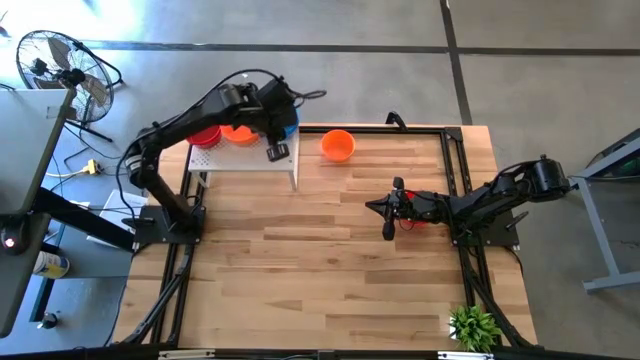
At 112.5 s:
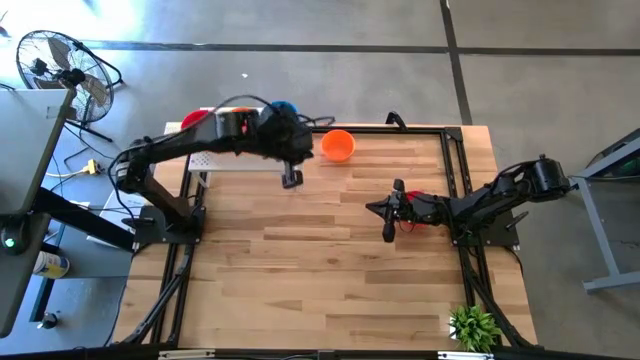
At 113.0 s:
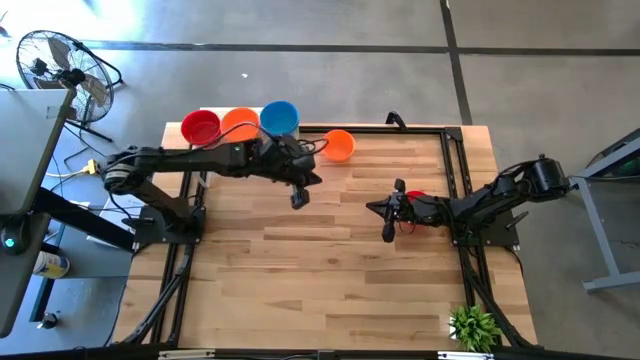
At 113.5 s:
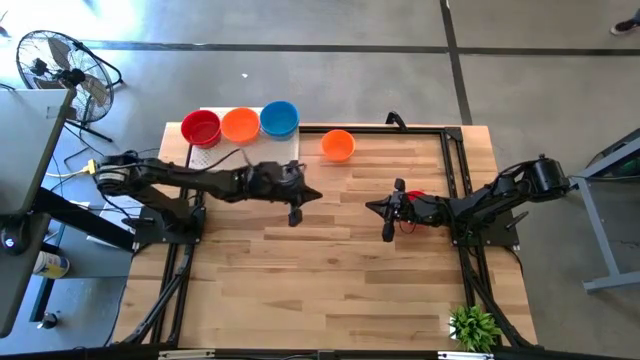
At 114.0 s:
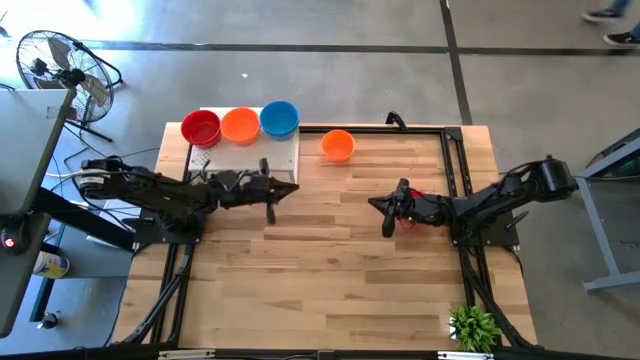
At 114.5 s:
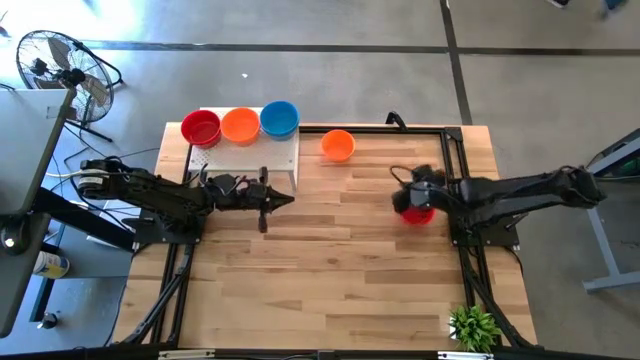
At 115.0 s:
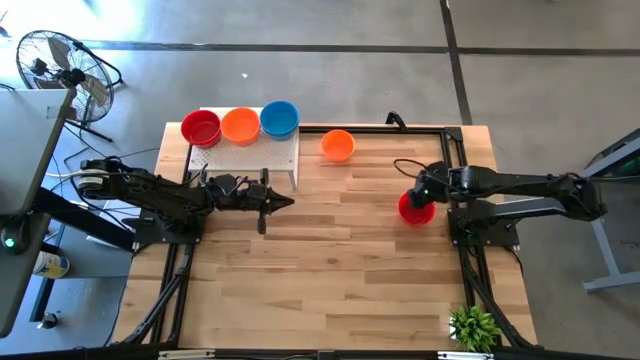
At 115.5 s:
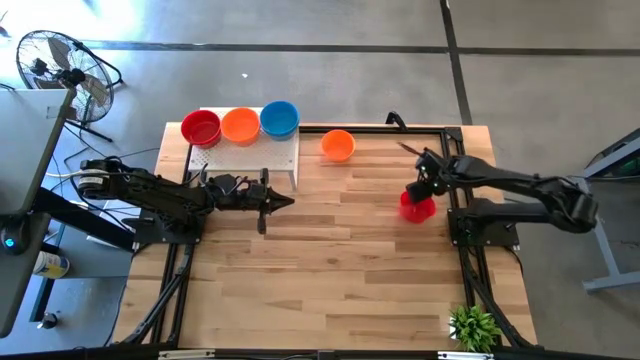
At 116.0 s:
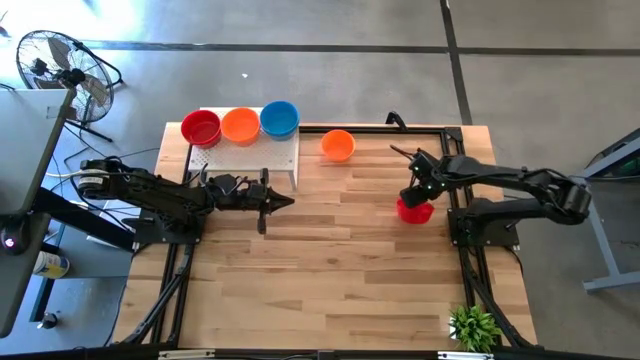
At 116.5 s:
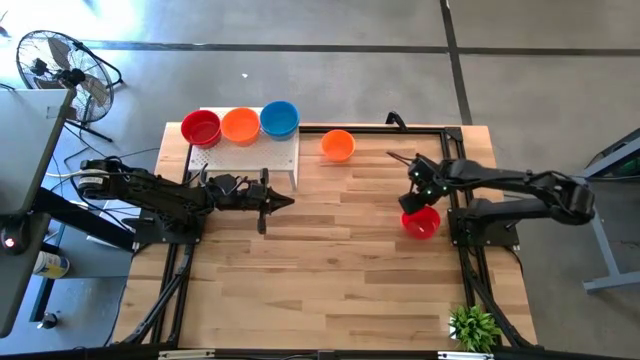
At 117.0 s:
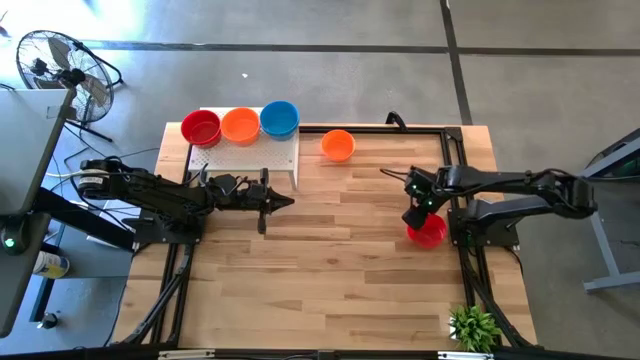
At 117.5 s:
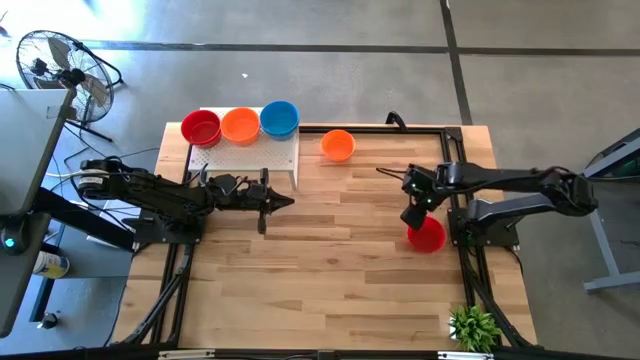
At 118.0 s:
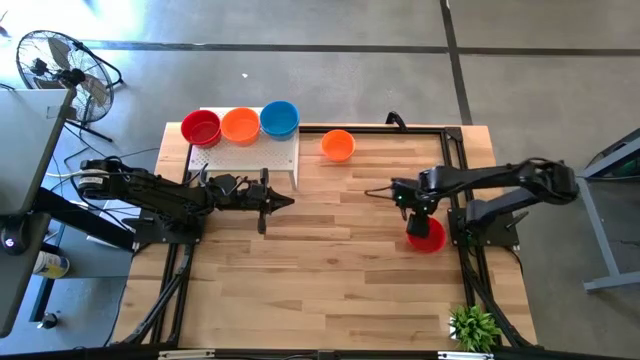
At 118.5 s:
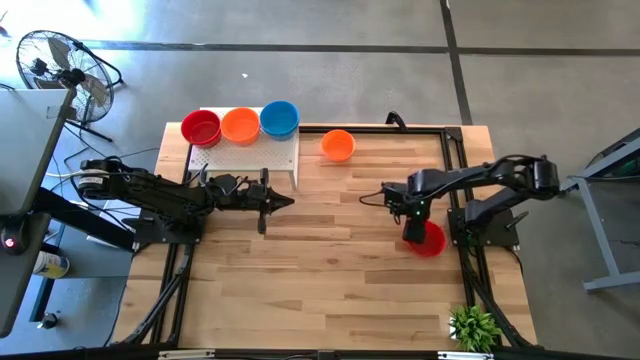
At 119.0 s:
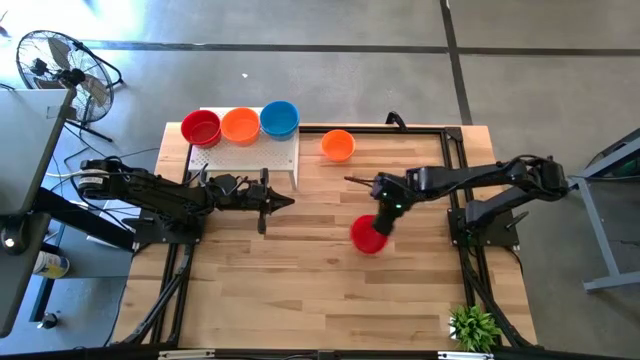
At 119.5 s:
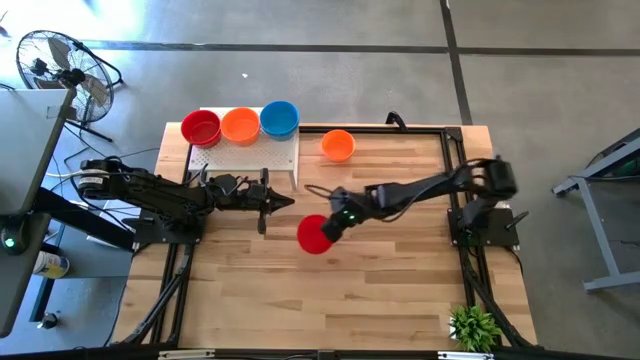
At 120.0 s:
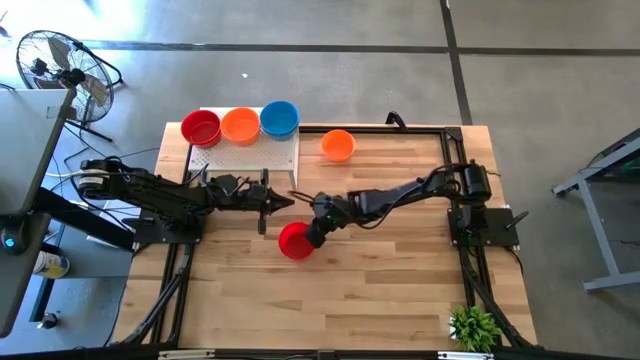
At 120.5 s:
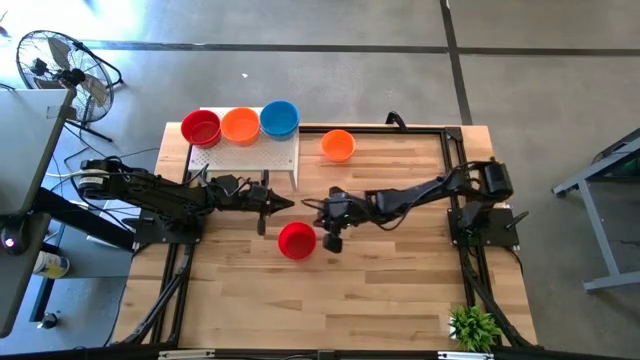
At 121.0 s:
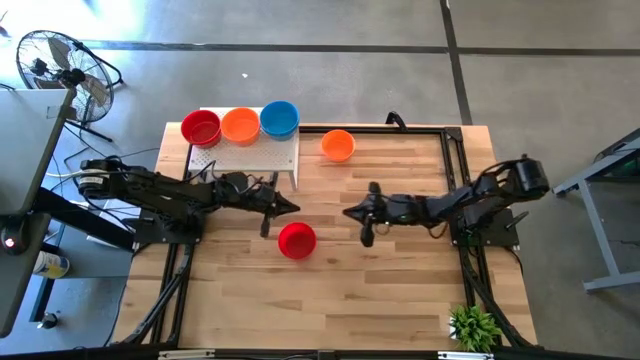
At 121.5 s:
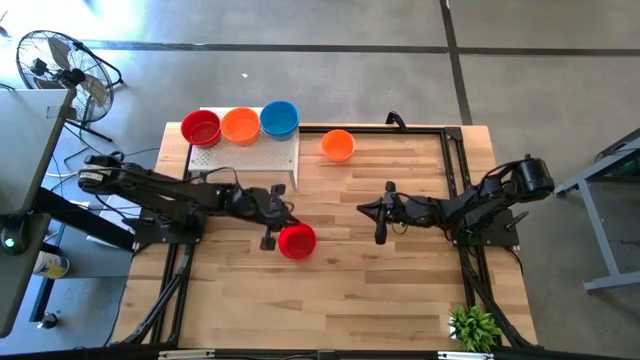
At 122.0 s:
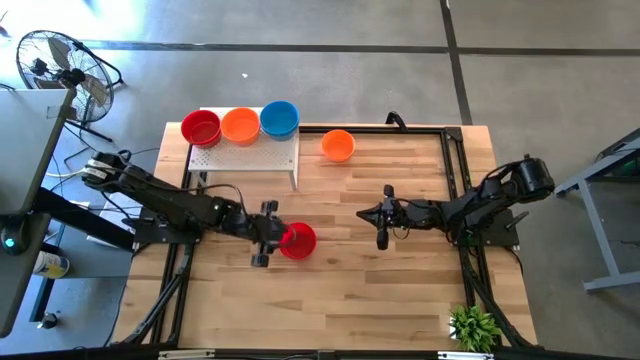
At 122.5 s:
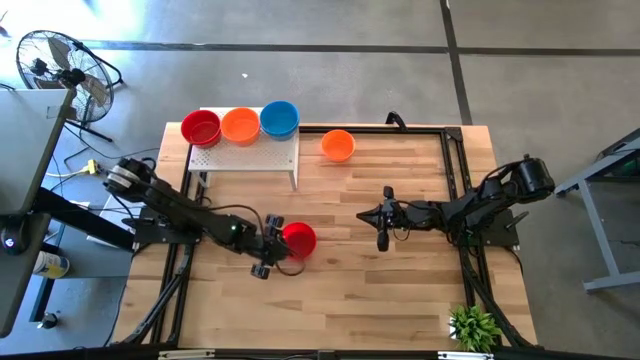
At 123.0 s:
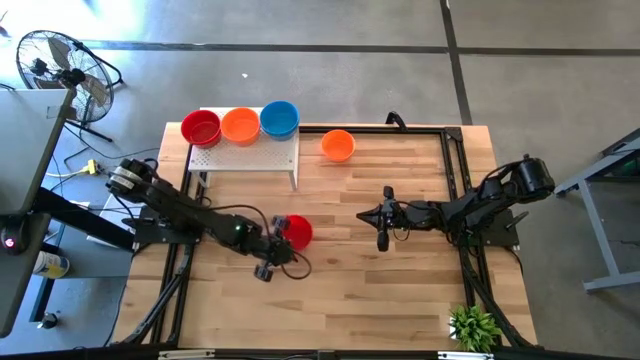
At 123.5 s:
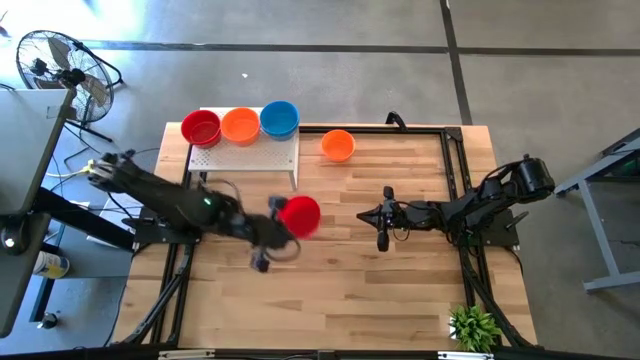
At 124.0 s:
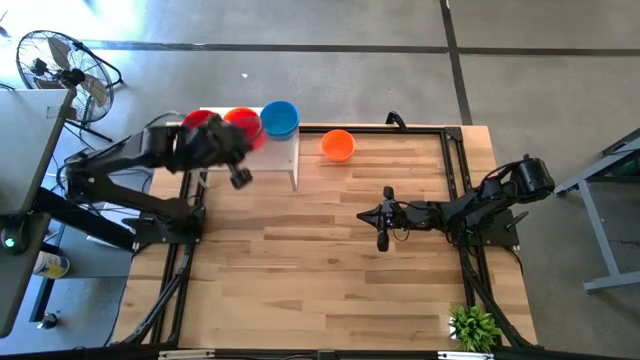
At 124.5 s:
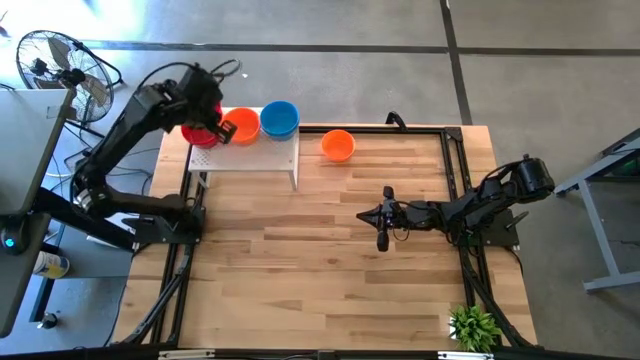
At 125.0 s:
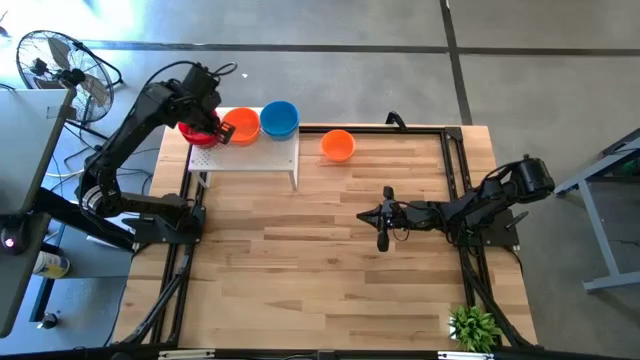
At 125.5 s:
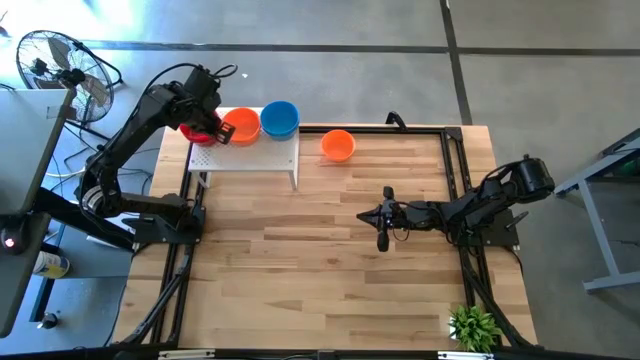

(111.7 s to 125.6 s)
Task: Pick & Place Mini bowls
Stack the red bowl on top of the other red bowls on the shelf

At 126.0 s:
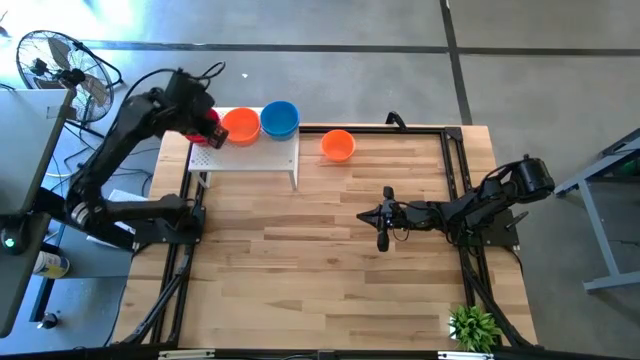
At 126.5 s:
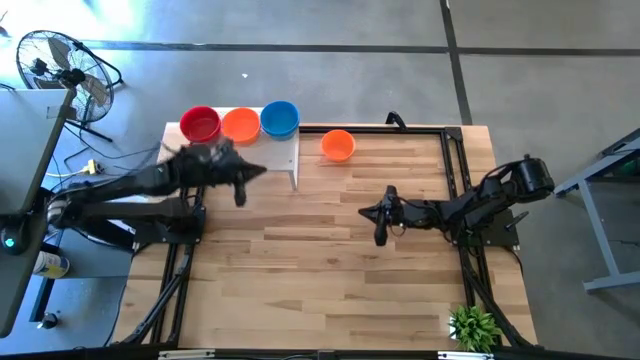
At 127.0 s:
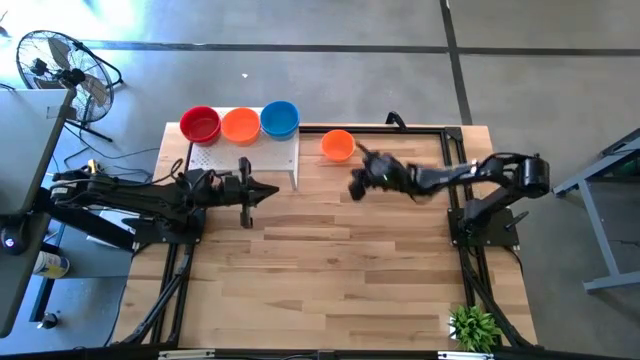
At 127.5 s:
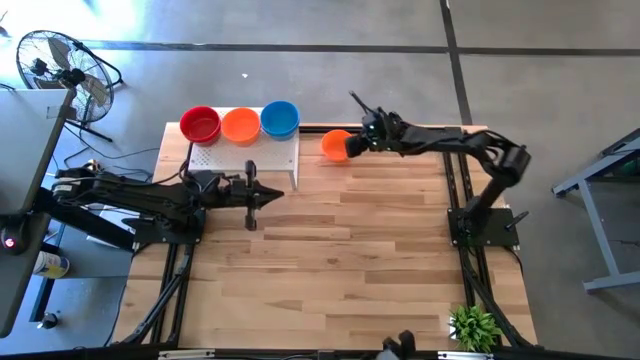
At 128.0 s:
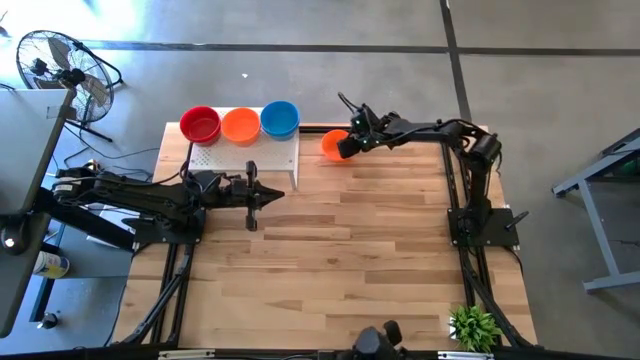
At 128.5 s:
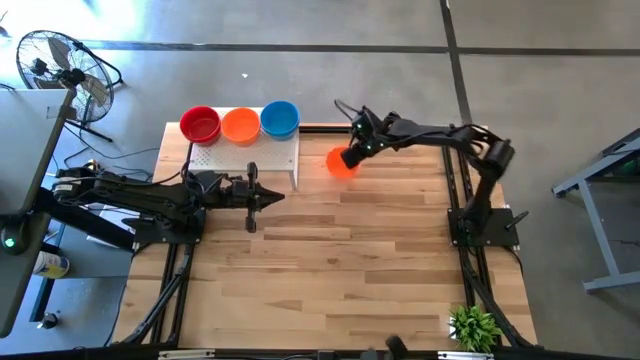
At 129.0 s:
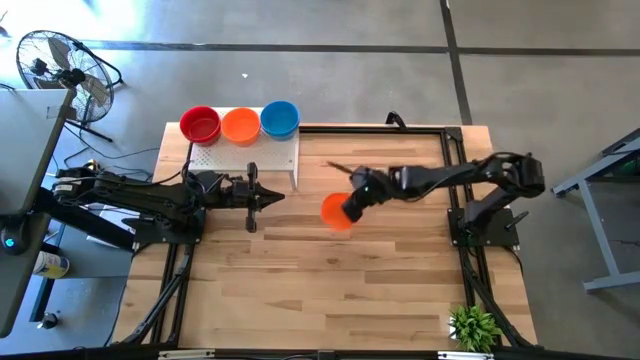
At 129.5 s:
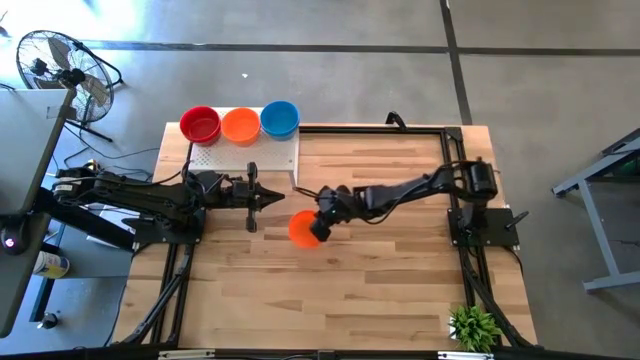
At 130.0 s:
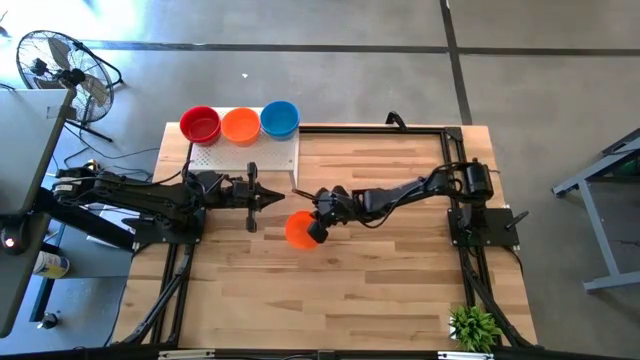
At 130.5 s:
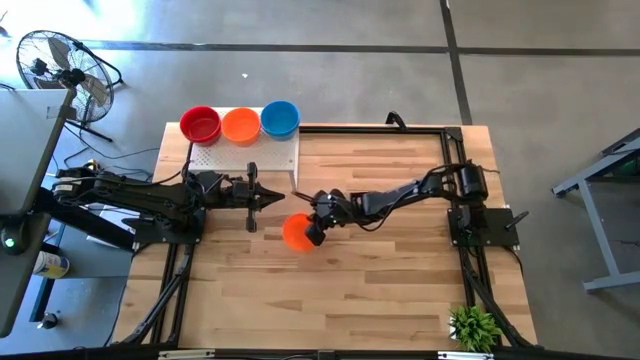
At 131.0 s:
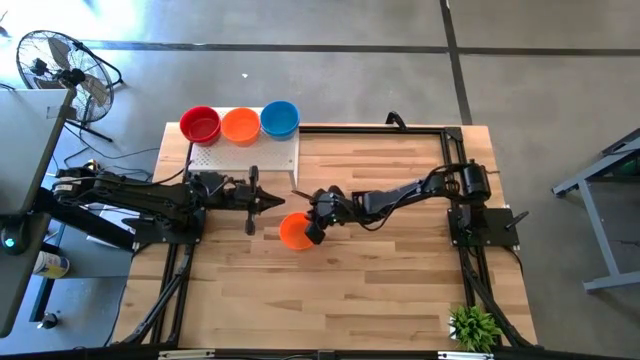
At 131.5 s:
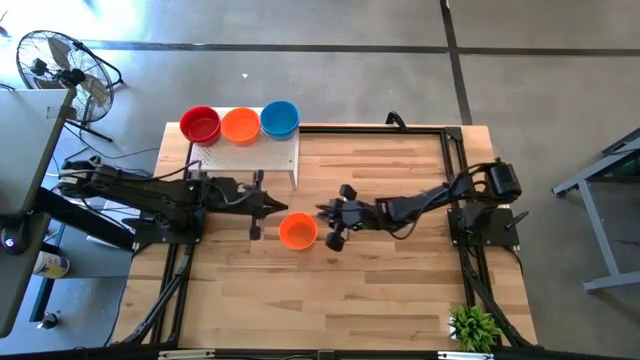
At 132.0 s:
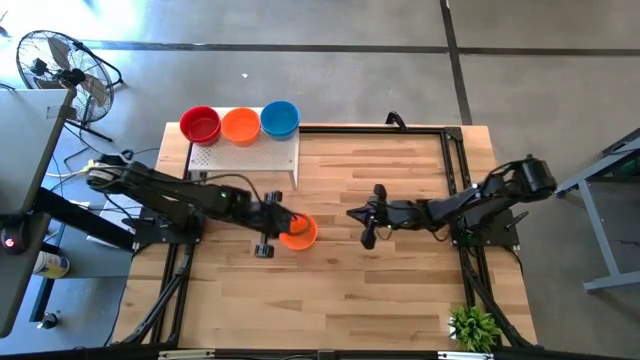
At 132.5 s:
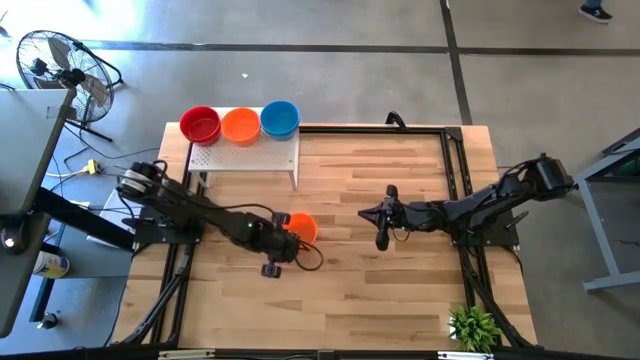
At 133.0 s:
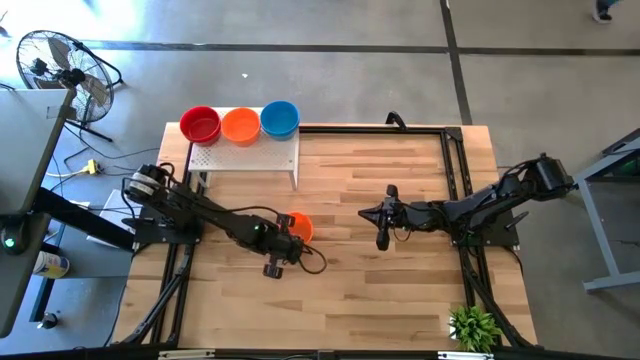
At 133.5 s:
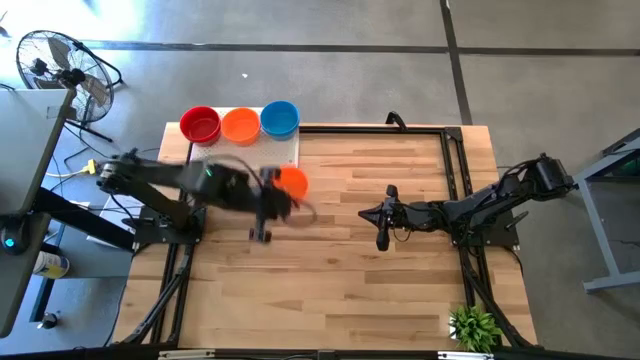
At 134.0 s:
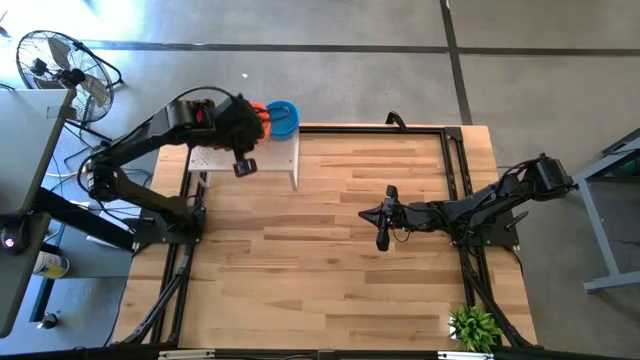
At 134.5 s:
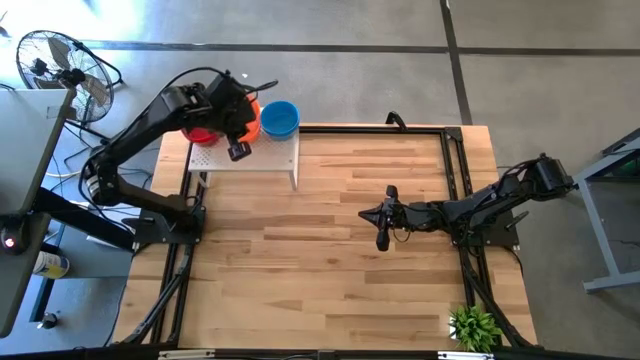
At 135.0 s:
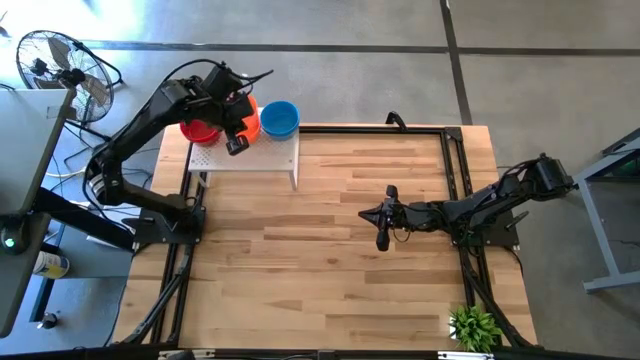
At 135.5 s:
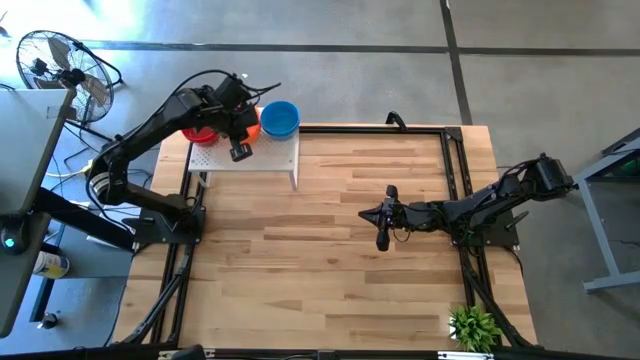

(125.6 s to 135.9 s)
Stack the orange bowl on top of the other orange bowls on the shelf
